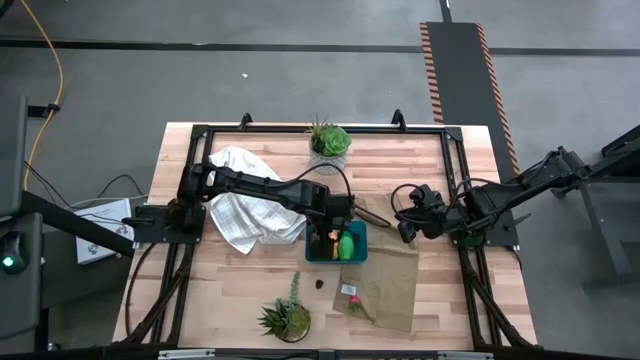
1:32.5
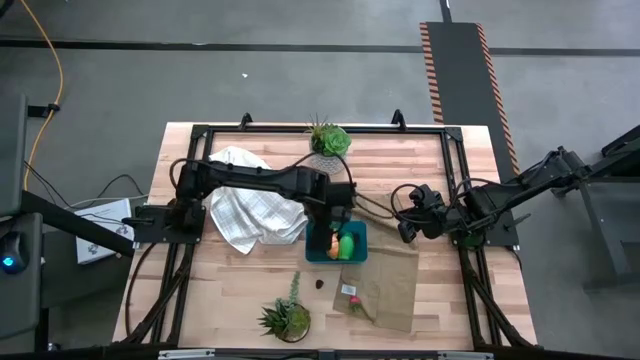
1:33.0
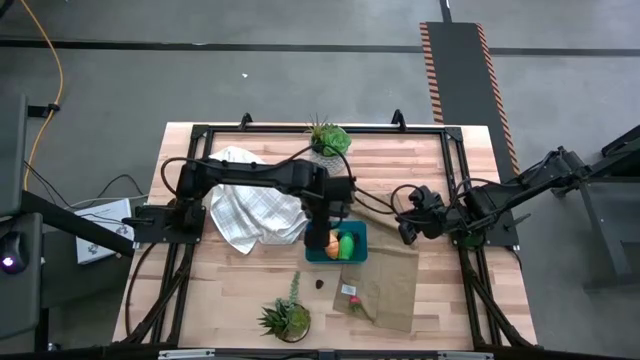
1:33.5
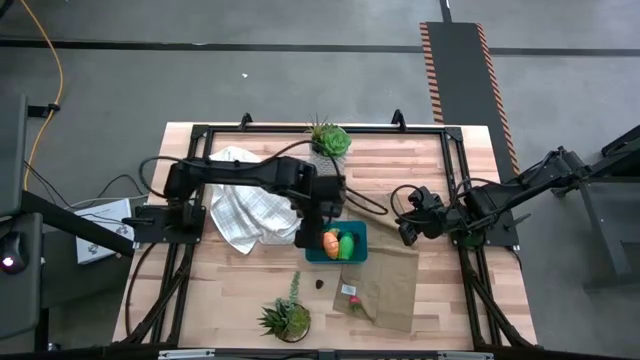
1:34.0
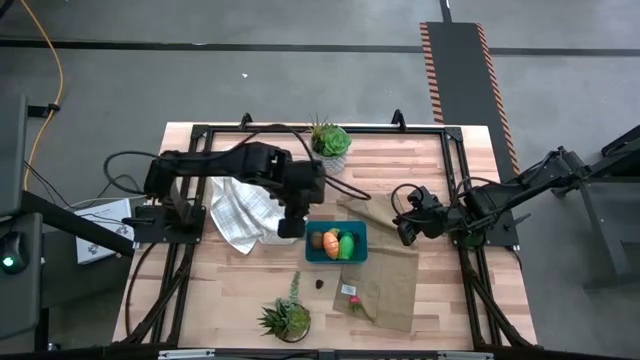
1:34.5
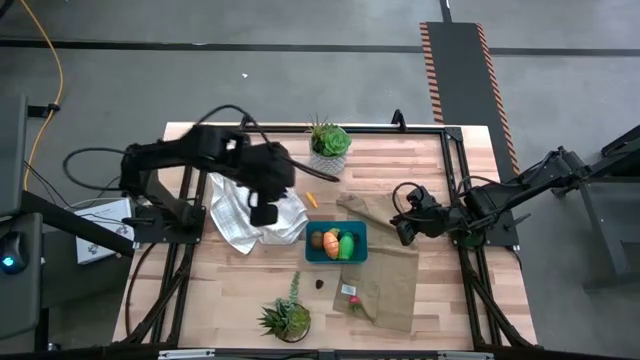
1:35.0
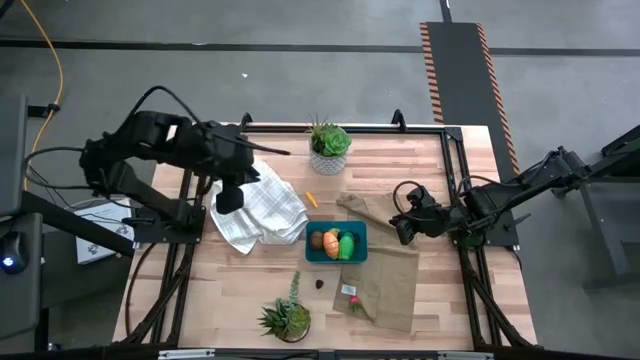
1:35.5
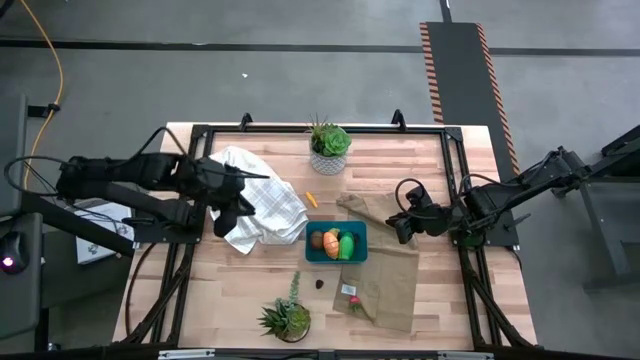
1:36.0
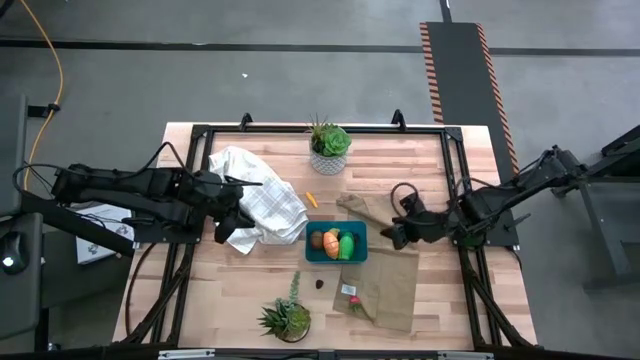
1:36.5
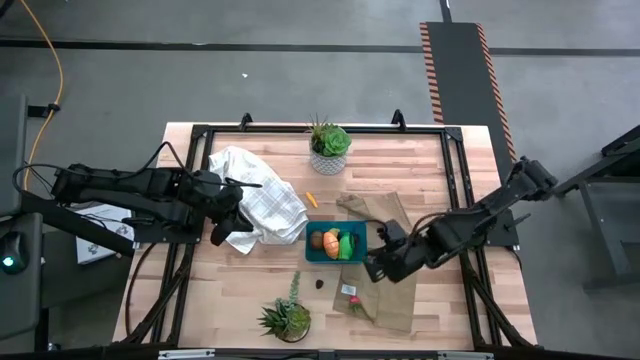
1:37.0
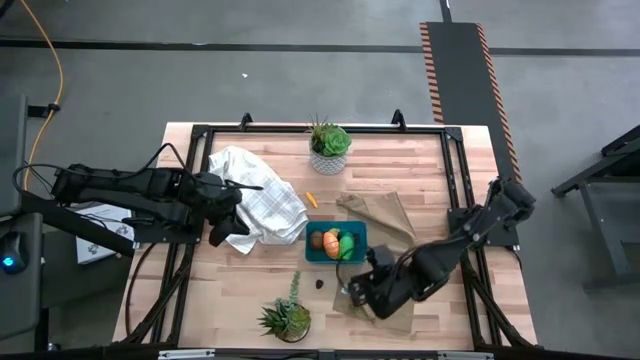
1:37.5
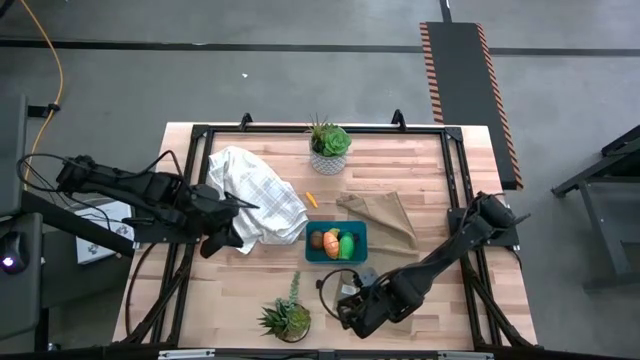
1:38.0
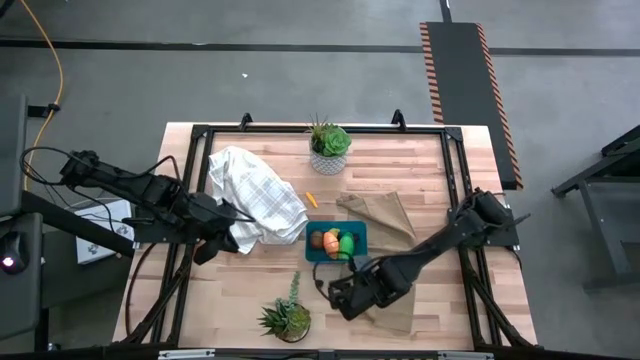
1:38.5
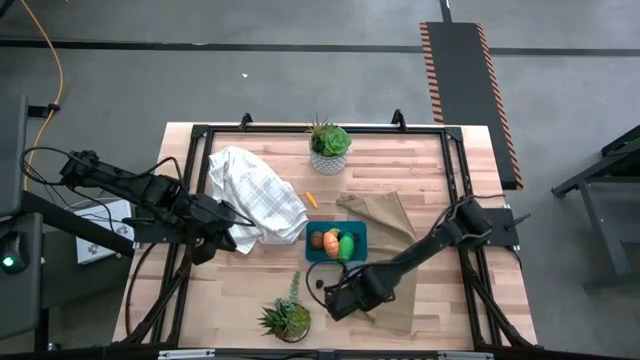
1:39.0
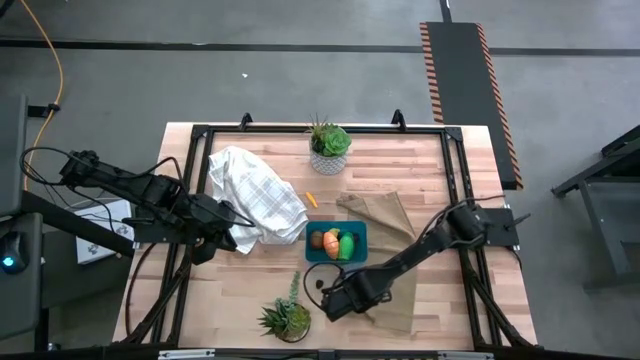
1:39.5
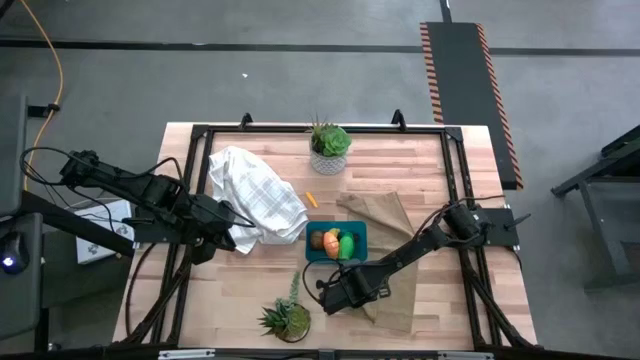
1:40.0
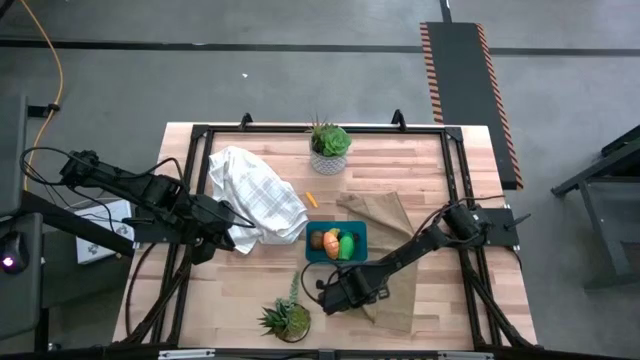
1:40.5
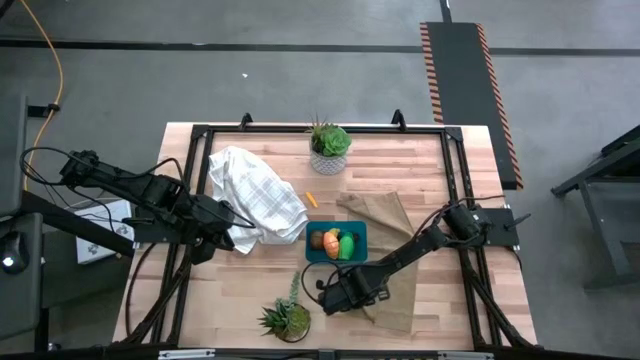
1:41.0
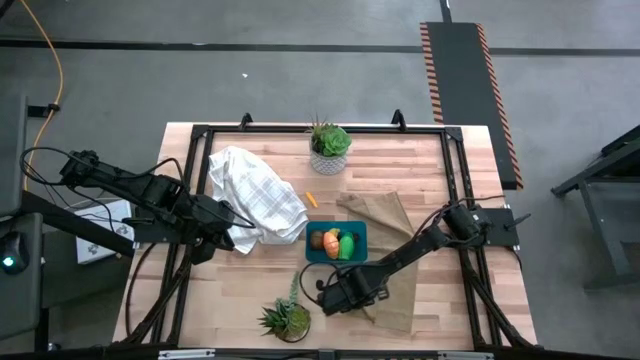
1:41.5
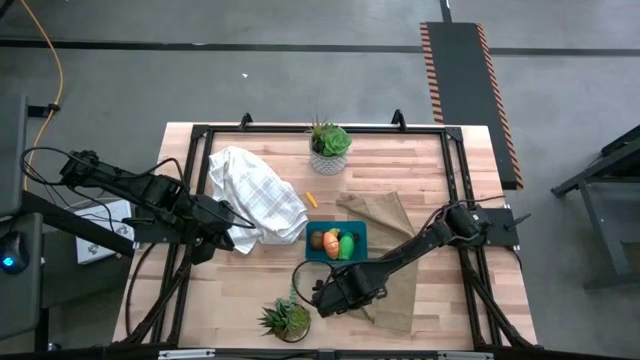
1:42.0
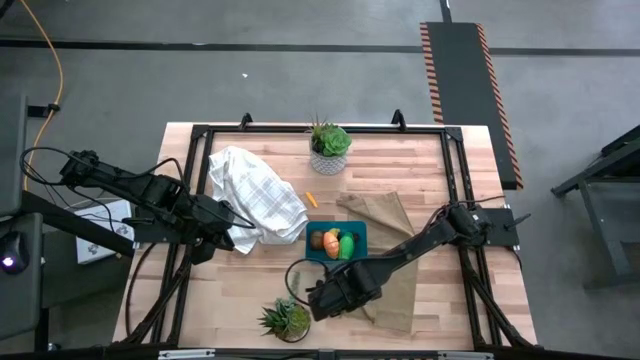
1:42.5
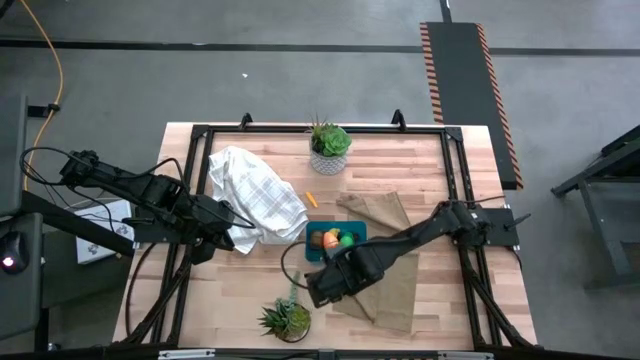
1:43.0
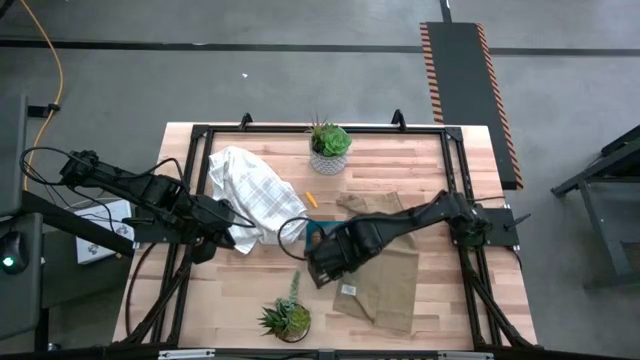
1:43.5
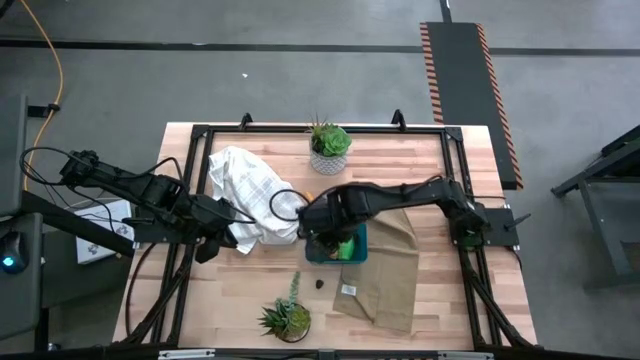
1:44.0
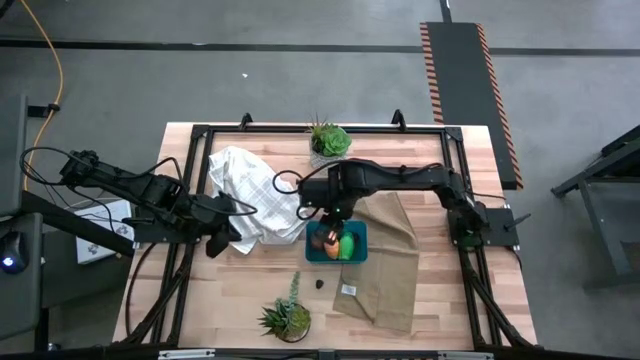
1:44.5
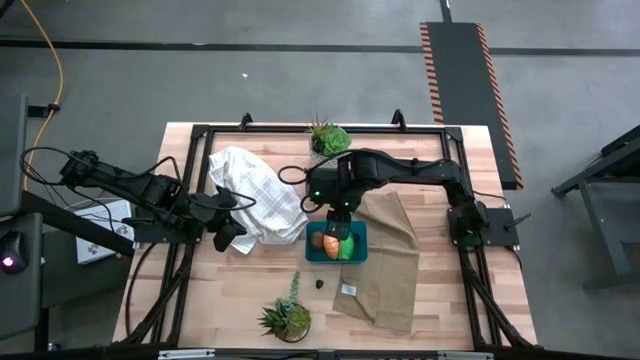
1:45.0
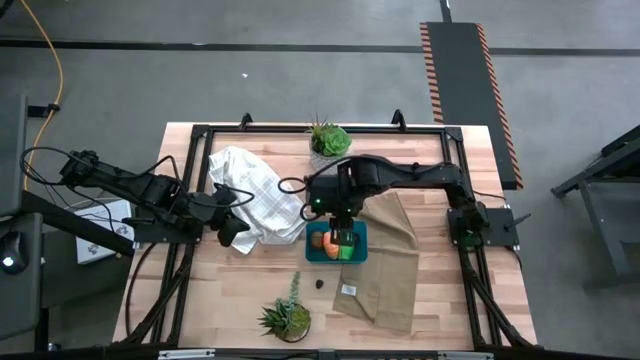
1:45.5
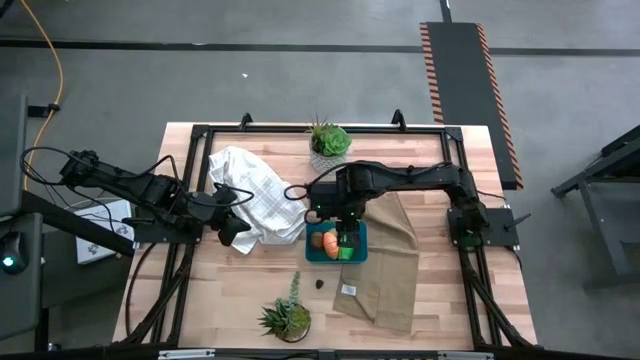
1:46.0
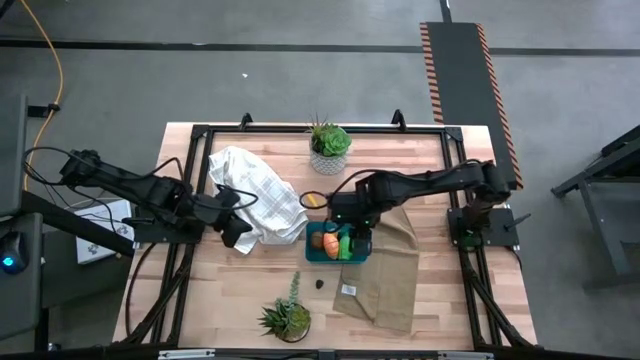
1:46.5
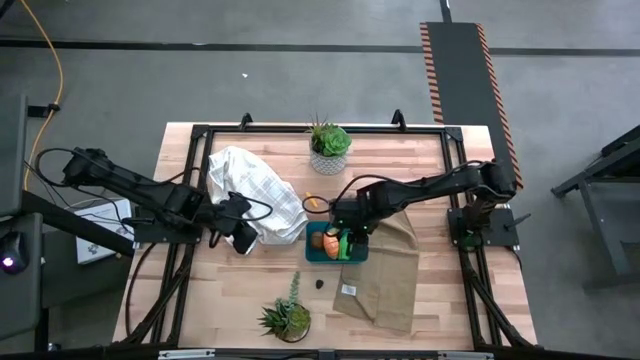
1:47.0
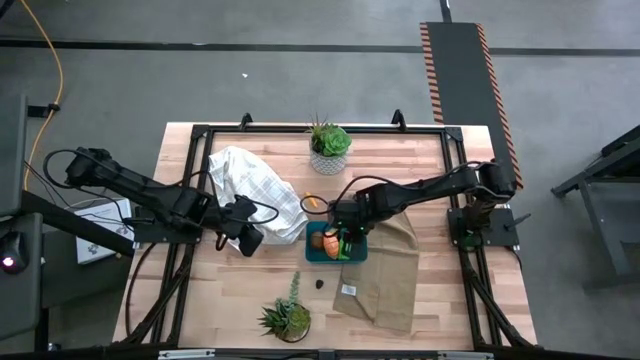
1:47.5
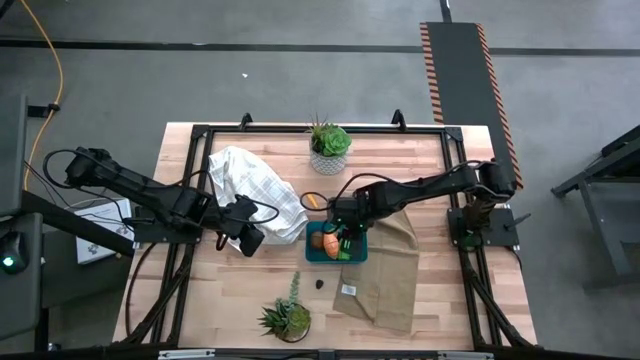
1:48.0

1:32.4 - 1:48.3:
Task: Pick and placing Produce into tupperware
Put the red strawberry into the blue bin

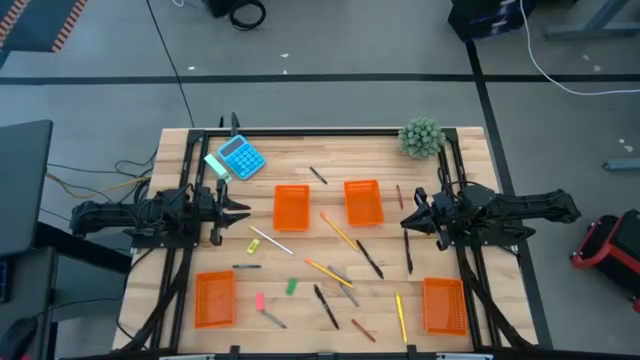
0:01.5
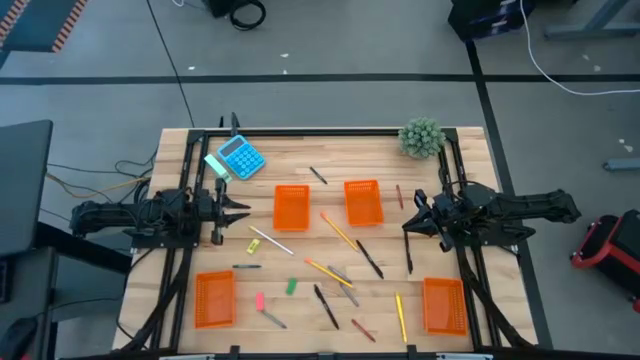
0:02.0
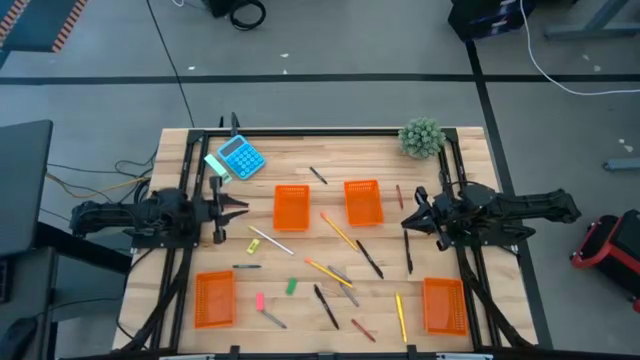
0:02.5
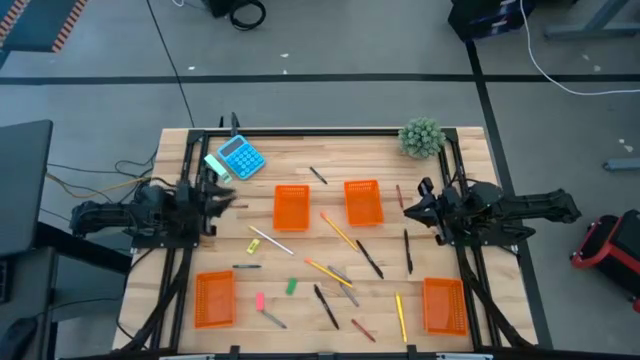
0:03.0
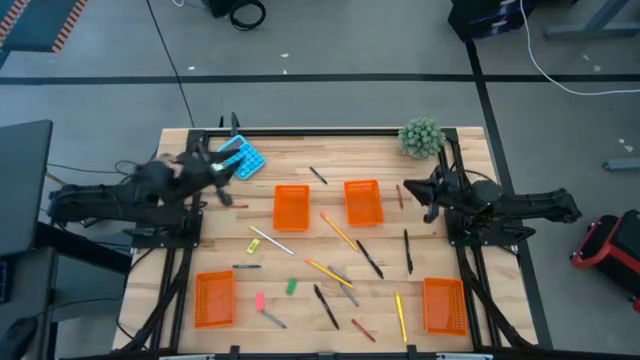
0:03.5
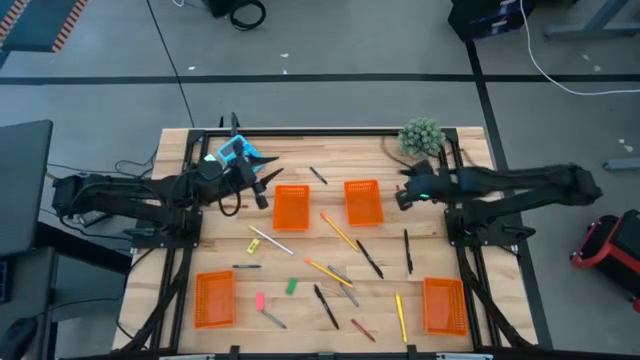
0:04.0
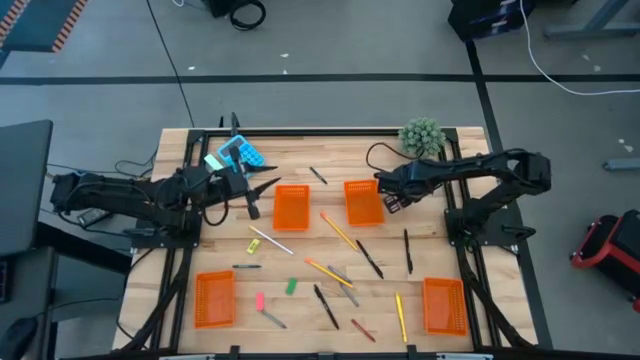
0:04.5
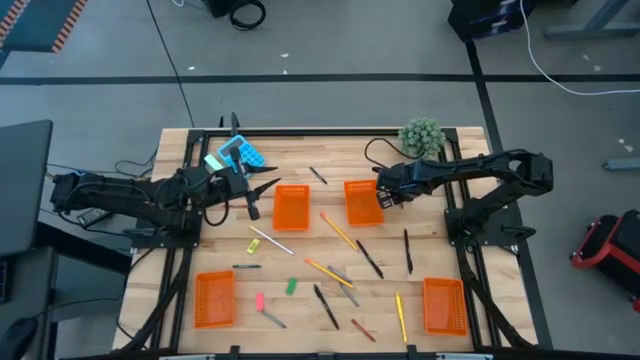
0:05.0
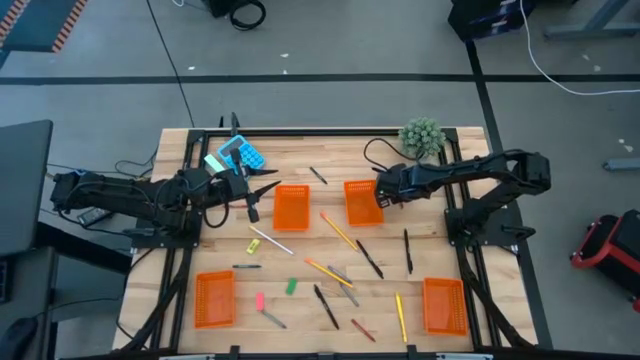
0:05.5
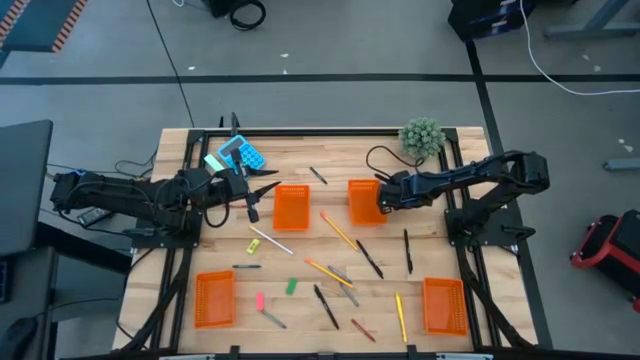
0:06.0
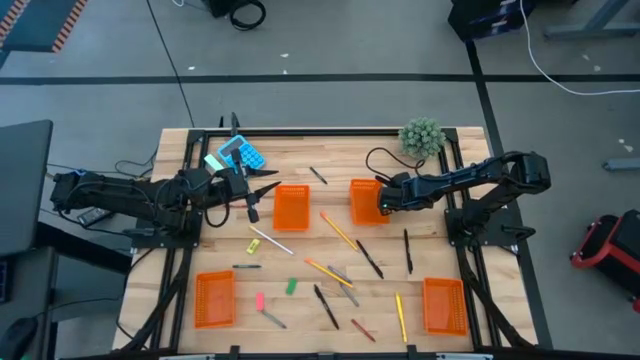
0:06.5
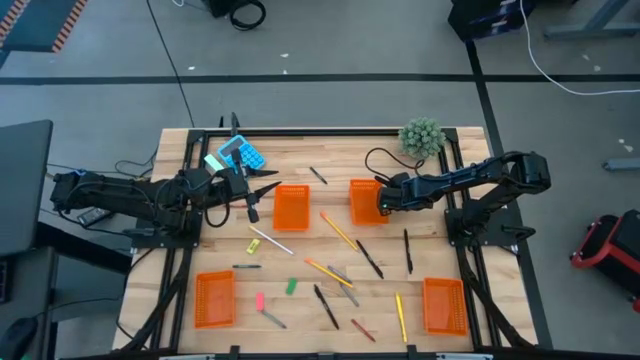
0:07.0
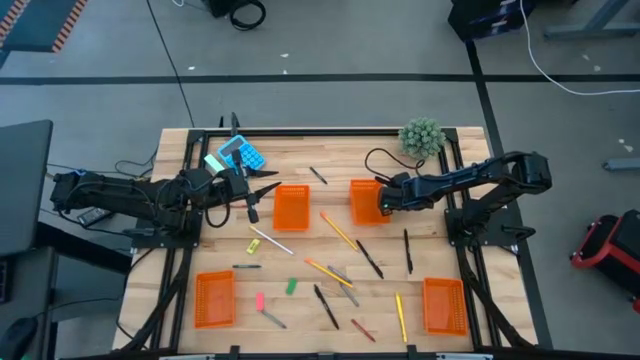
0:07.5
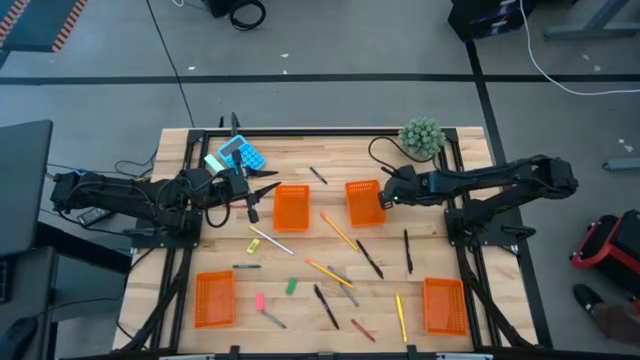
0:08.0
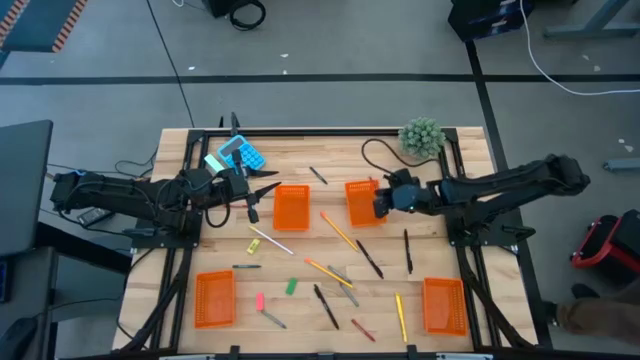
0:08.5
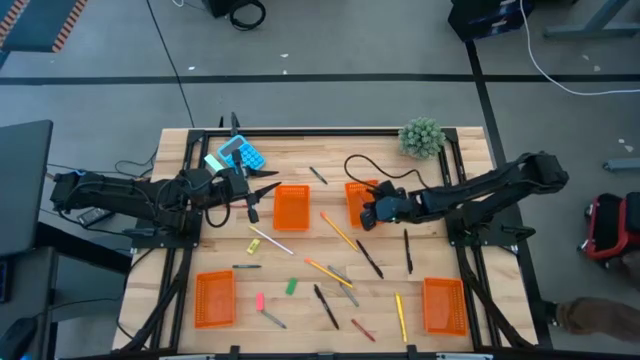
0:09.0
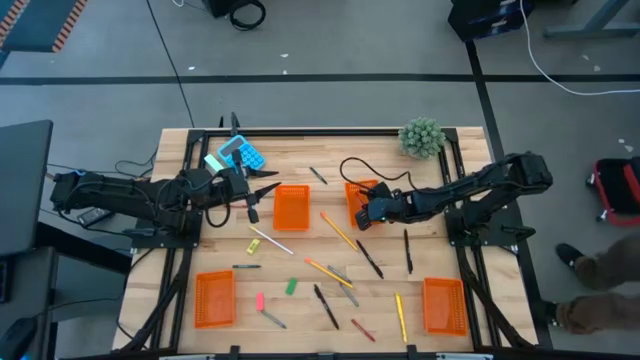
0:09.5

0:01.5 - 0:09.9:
Task: Sort crayons/erasers/pens/pencils in bins
Put the top red crayon into the top right orange bin
